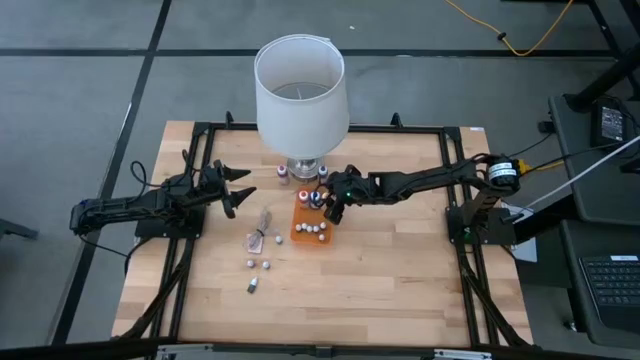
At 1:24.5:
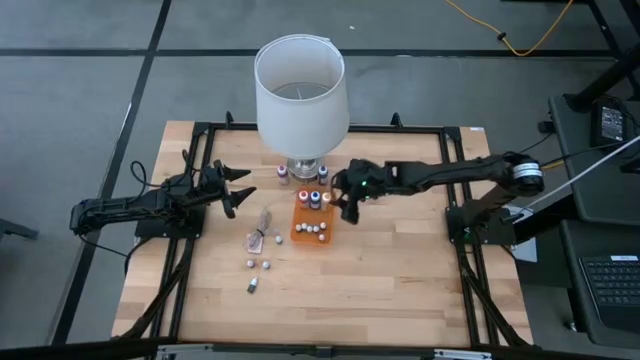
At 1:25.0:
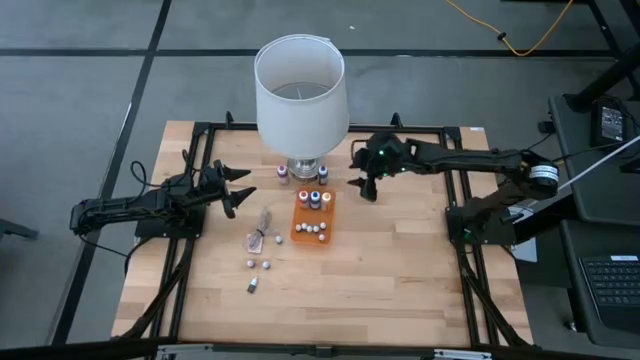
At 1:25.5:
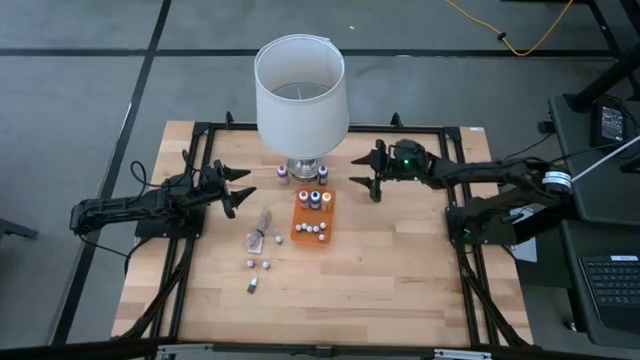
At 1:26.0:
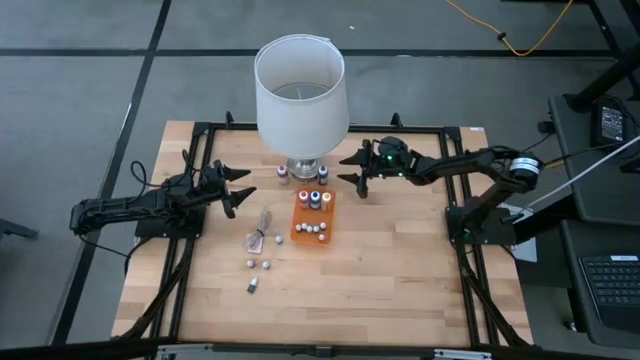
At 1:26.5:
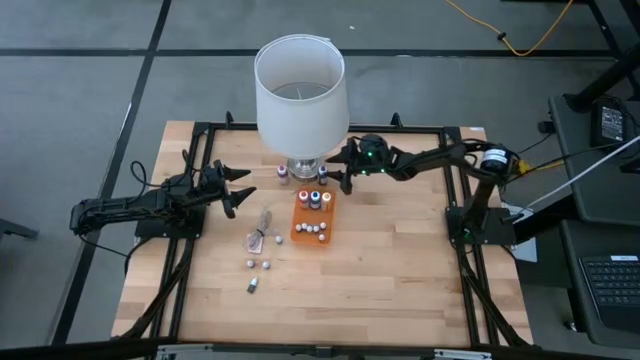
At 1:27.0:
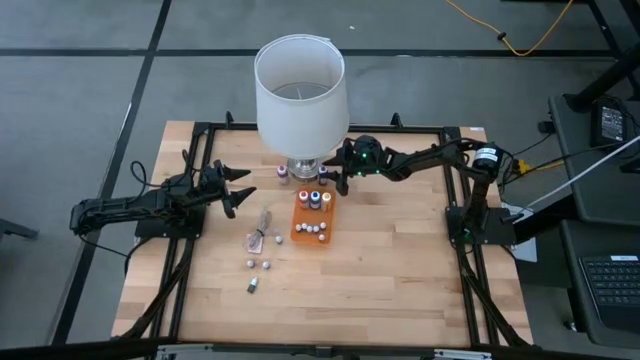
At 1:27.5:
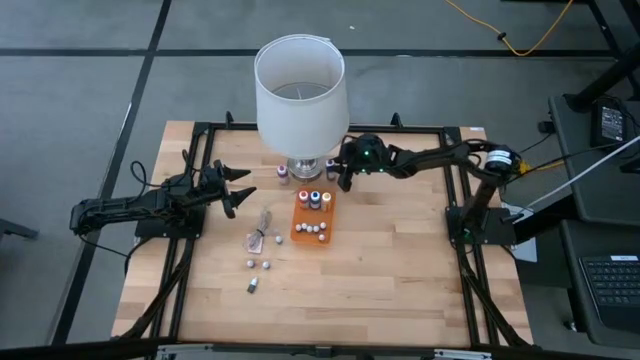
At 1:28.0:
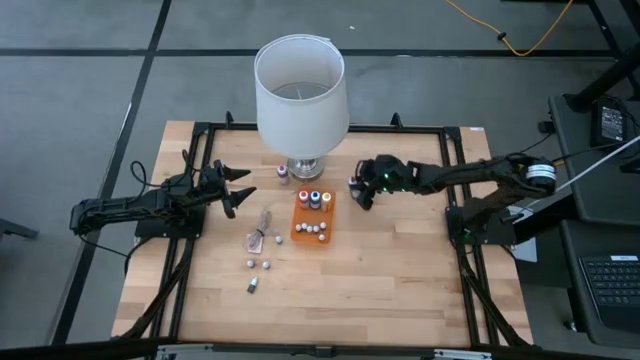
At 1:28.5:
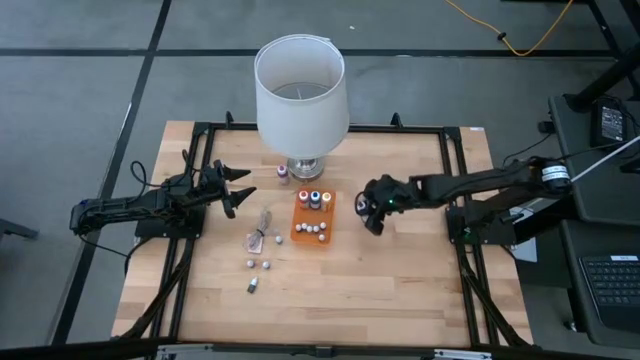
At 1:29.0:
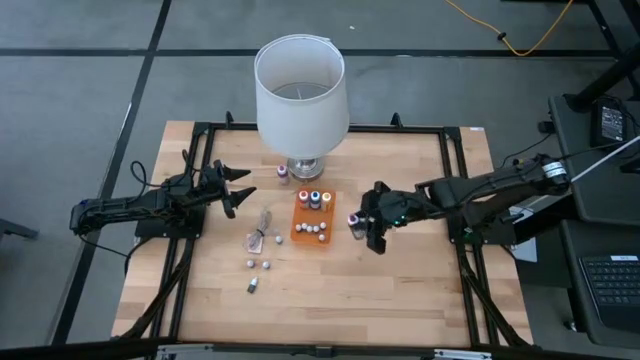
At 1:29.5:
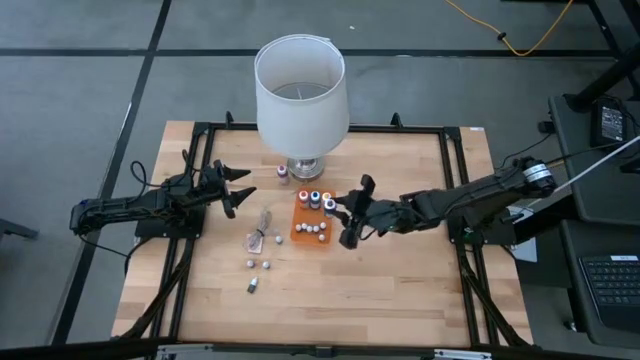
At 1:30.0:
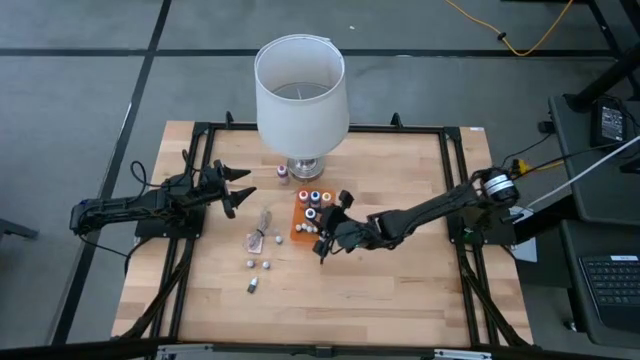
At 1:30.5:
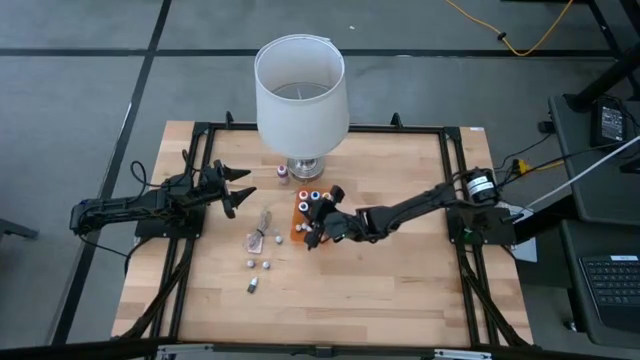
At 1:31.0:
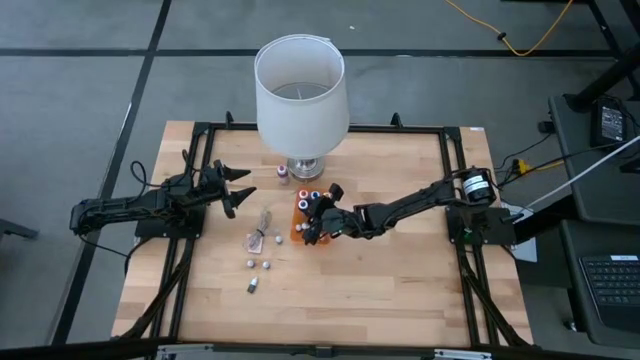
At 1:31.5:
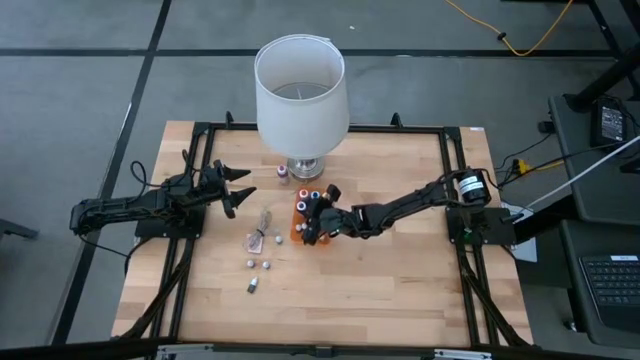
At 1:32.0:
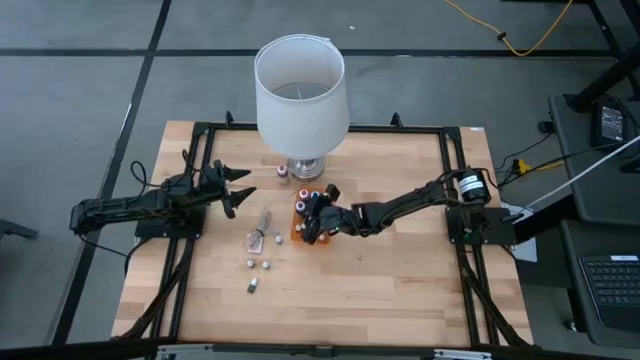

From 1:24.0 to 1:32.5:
Task: Pick & Place food coloring
Put the large purple food coloring bottle into the orange bin

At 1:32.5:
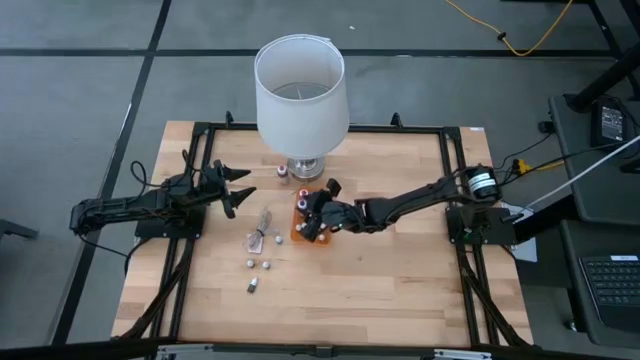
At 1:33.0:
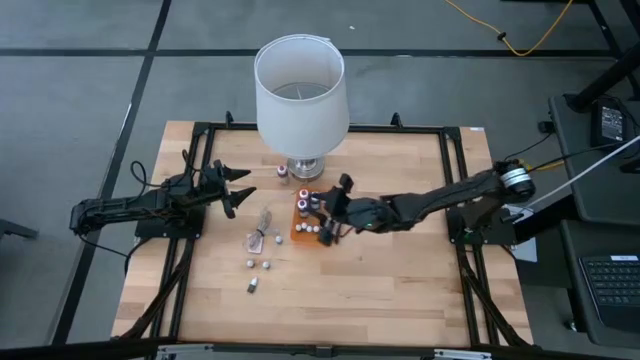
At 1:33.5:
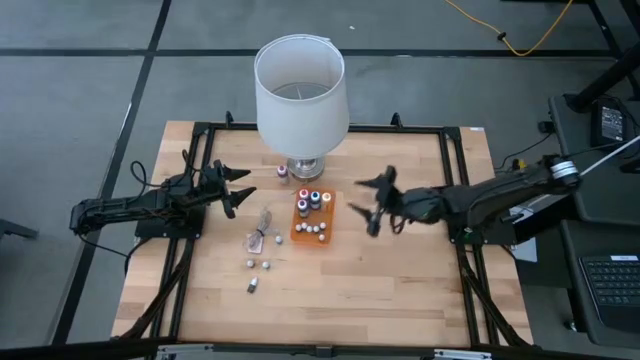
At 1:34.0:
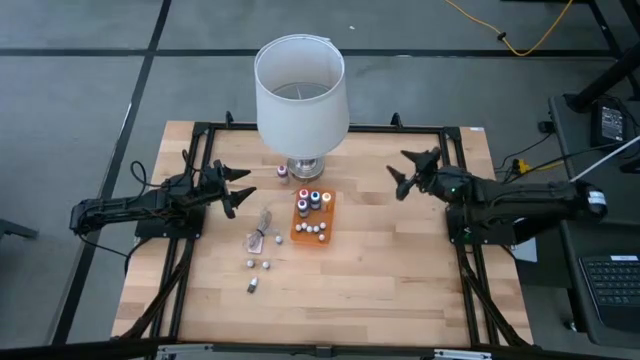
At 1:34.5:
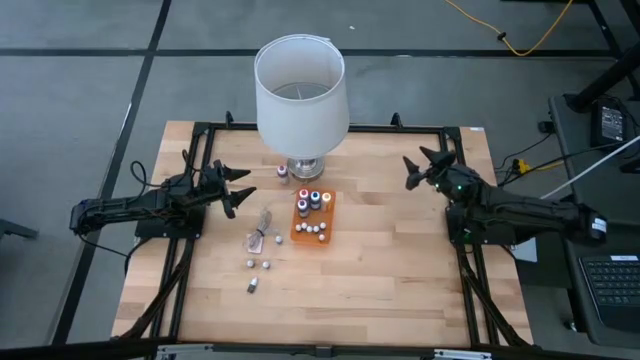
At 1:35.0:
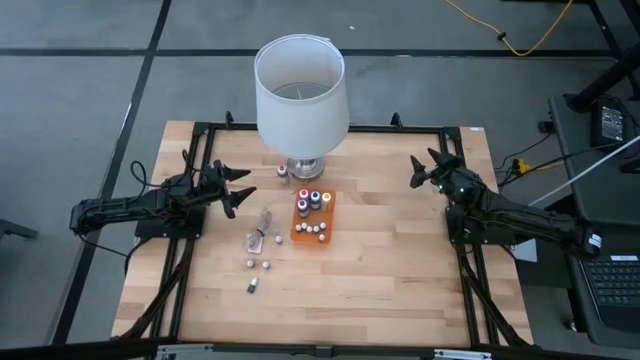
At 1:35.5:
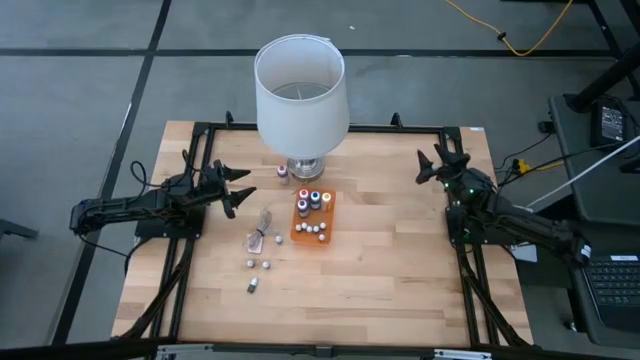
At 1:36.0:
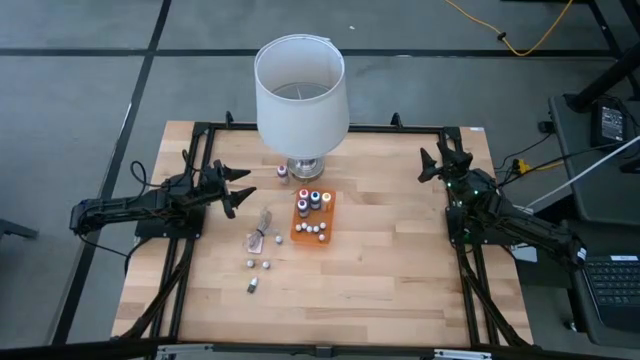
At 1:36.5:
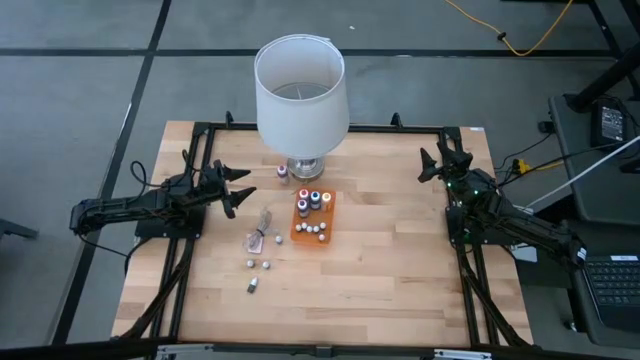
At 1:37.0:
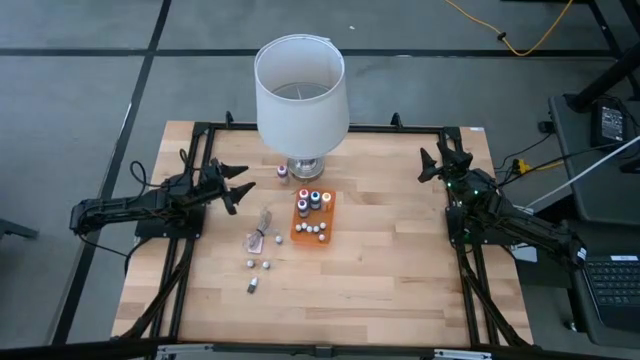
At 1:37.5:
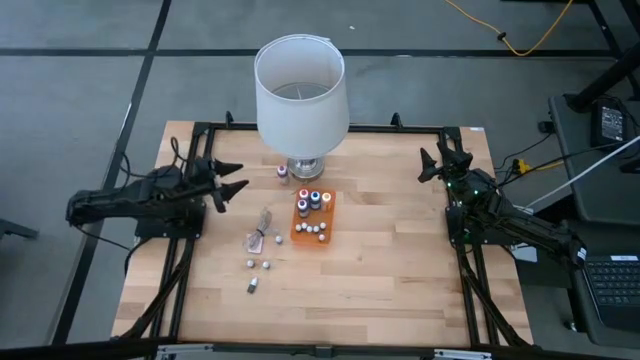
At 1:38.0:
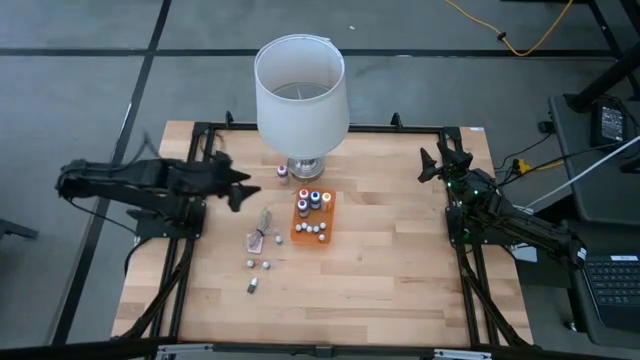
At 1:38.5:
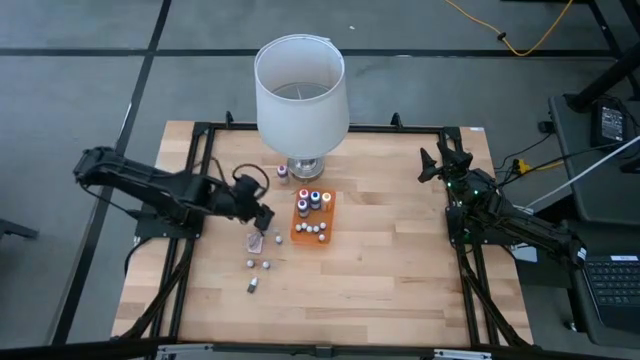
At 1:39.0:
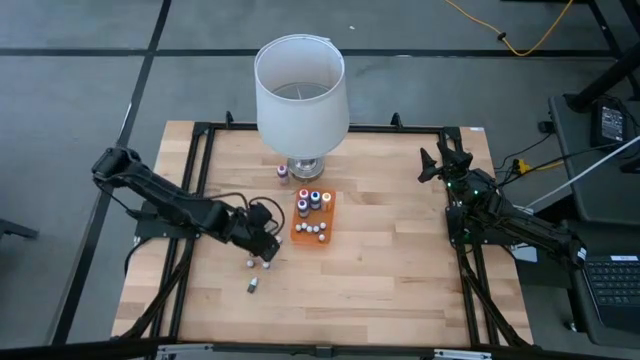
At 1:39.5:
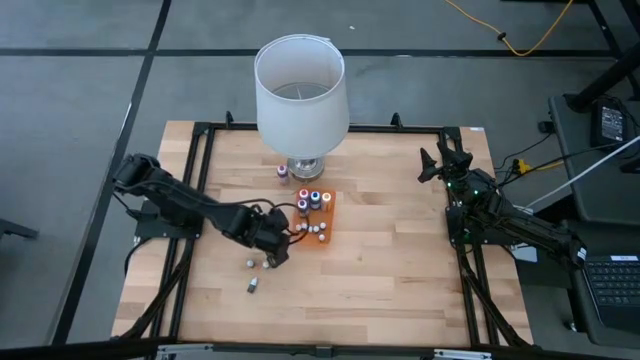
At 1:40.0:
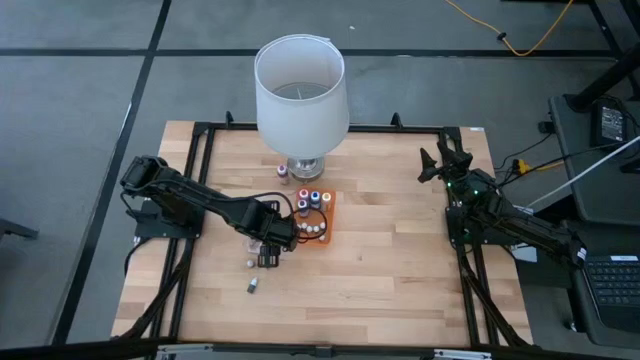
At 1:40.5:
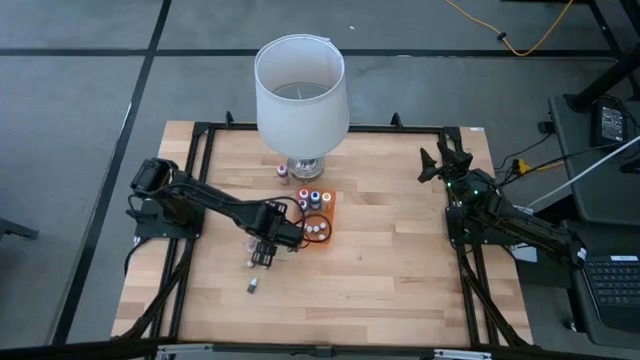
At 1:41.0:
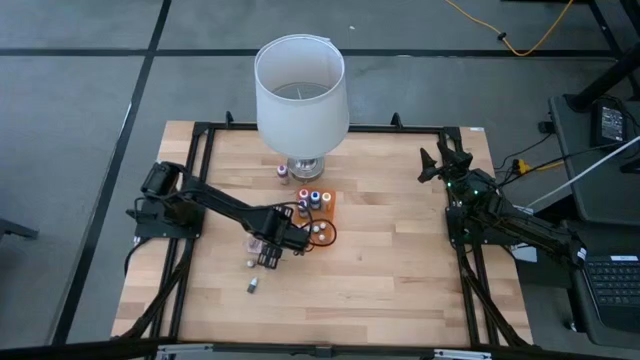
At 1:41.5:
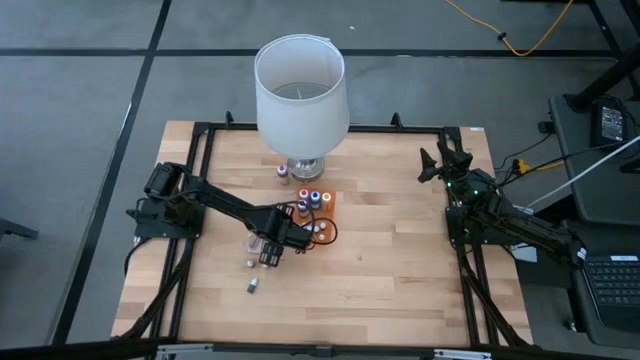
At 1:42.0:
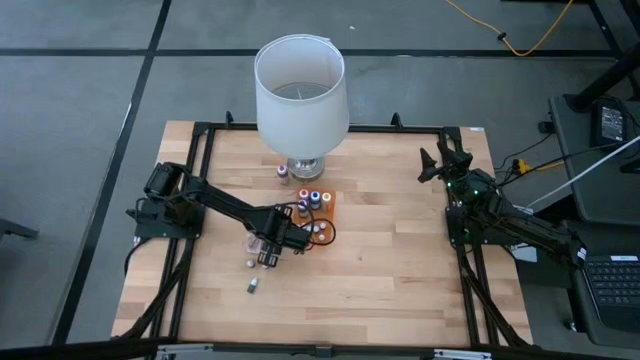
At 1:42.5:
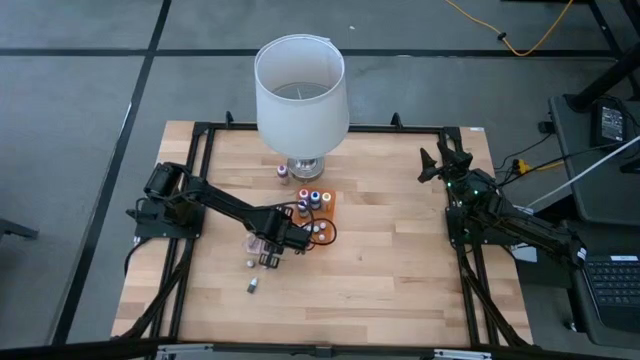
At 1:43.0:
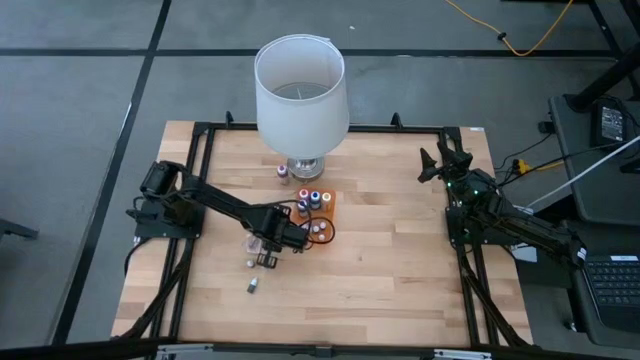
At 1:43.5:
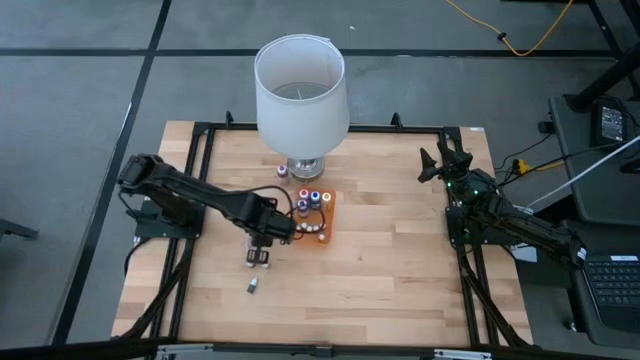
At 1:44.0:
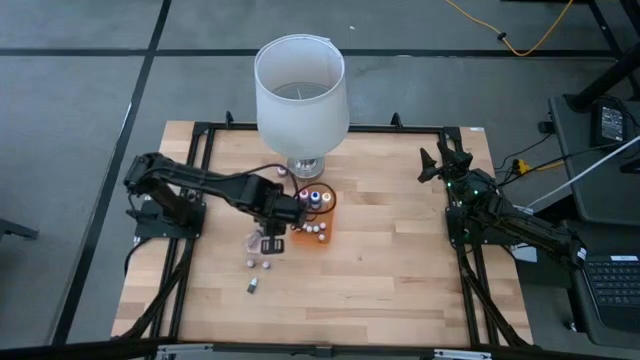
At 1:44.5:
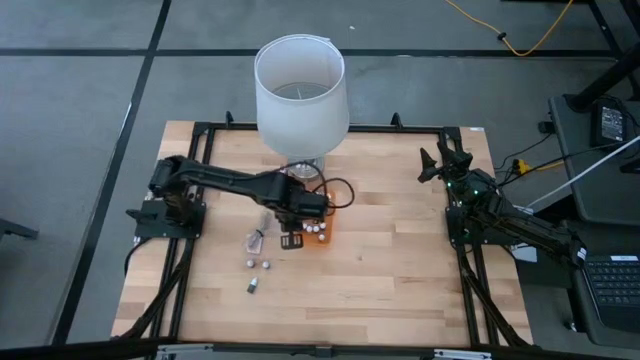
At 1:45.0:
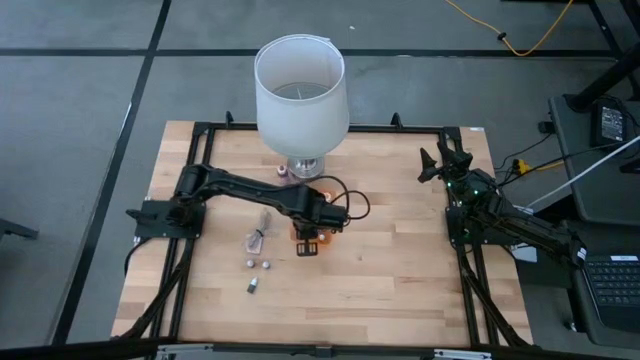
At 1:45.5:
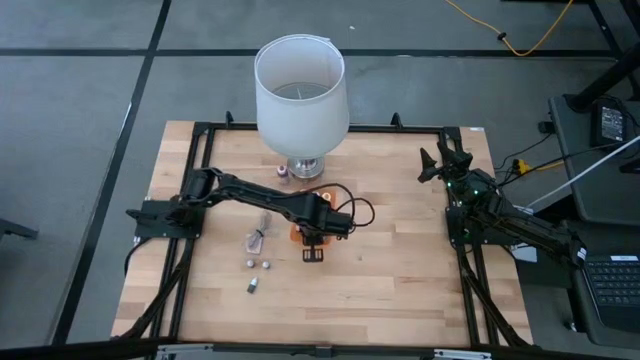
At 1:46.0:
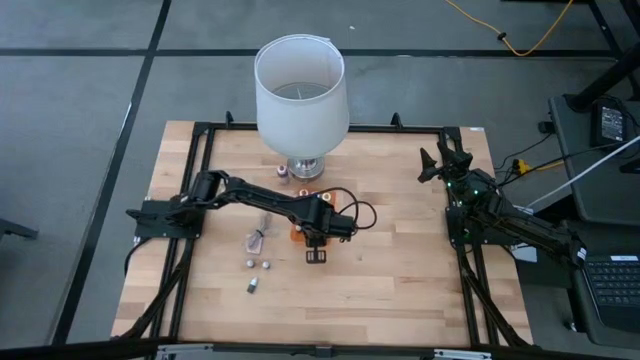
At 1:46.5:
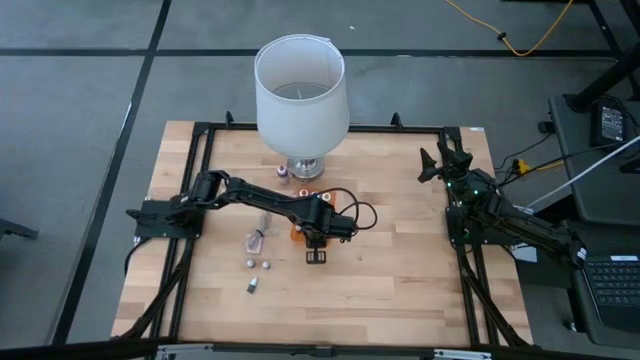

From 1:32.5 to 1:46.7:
Put the small blue food coloring bottle into the orange bin
